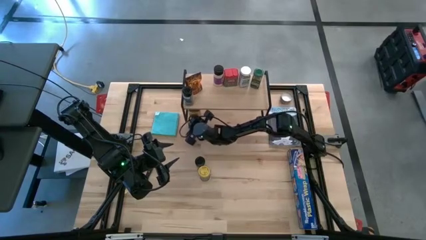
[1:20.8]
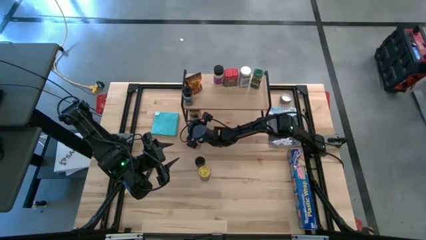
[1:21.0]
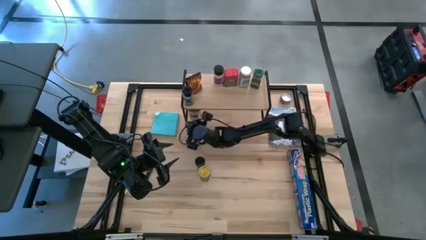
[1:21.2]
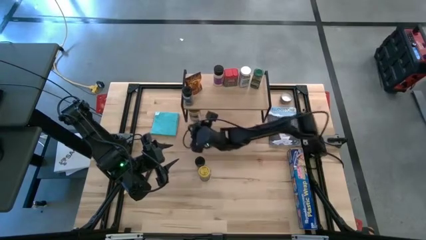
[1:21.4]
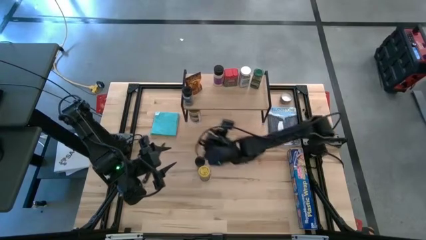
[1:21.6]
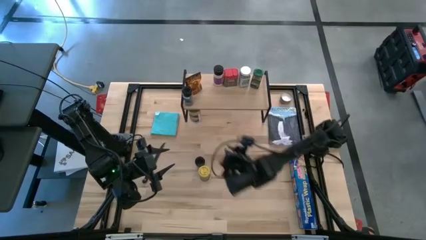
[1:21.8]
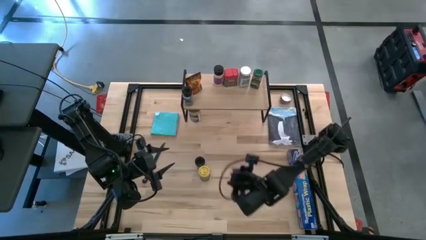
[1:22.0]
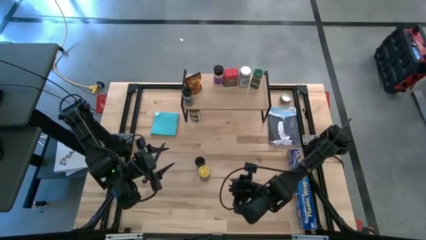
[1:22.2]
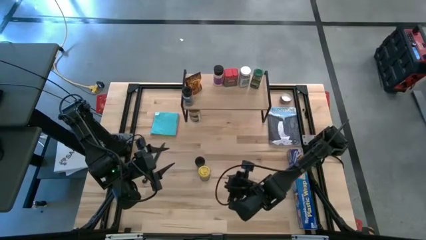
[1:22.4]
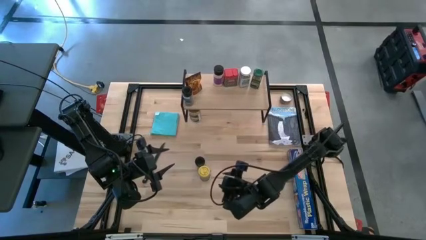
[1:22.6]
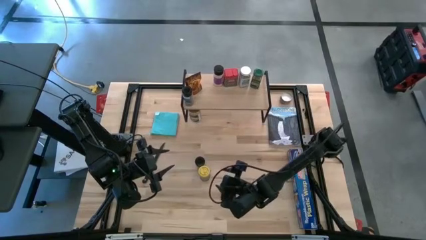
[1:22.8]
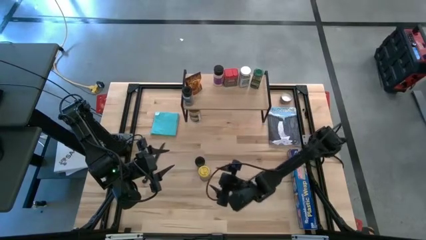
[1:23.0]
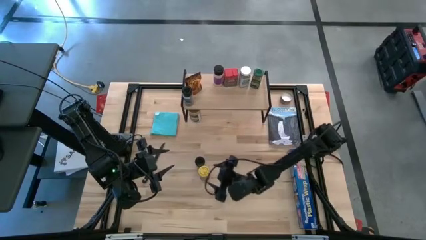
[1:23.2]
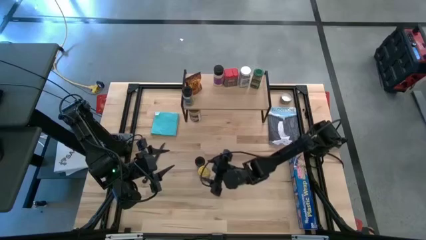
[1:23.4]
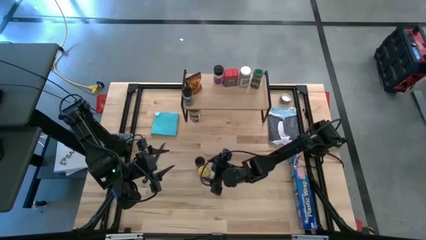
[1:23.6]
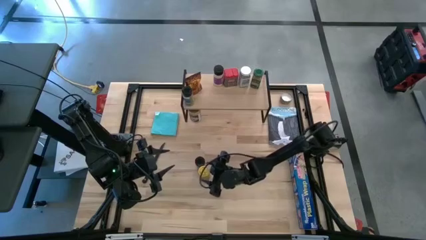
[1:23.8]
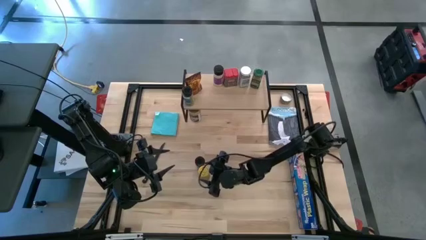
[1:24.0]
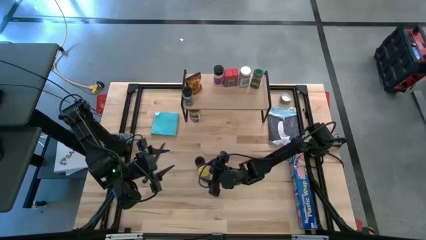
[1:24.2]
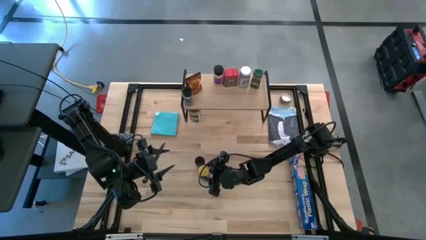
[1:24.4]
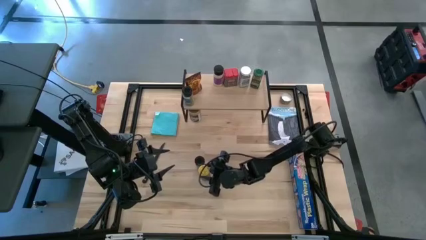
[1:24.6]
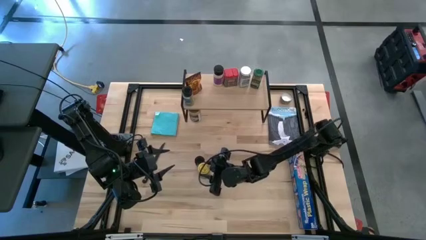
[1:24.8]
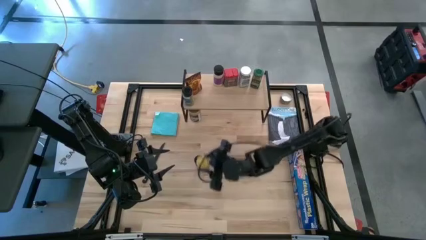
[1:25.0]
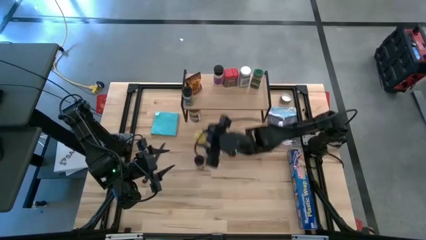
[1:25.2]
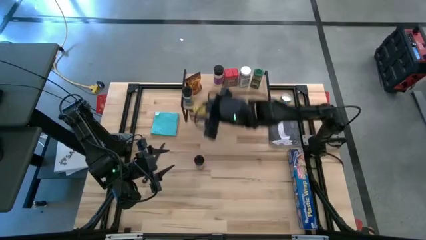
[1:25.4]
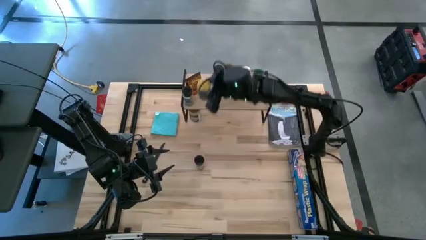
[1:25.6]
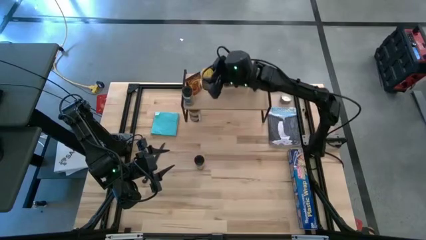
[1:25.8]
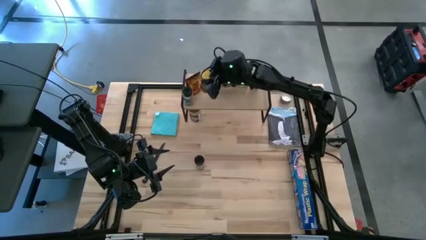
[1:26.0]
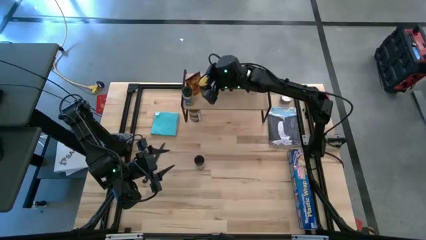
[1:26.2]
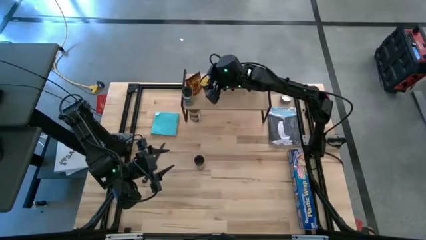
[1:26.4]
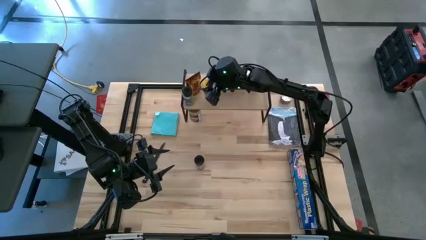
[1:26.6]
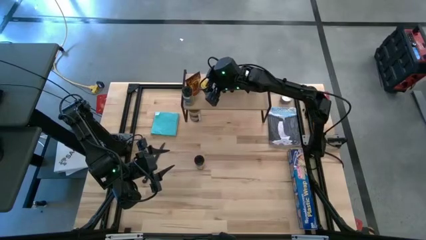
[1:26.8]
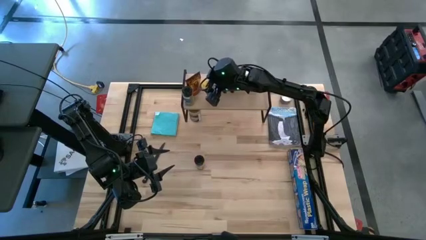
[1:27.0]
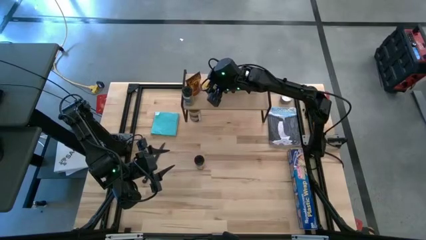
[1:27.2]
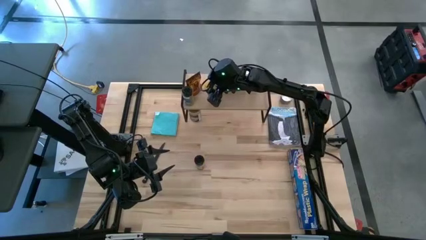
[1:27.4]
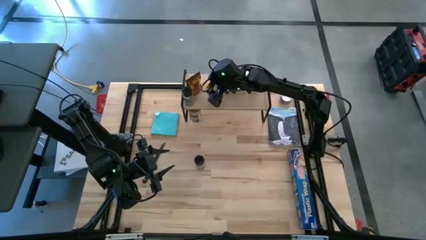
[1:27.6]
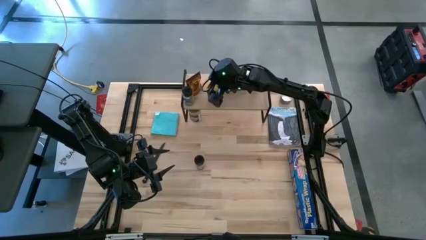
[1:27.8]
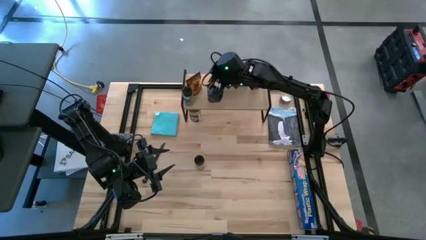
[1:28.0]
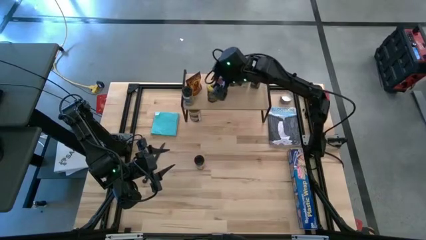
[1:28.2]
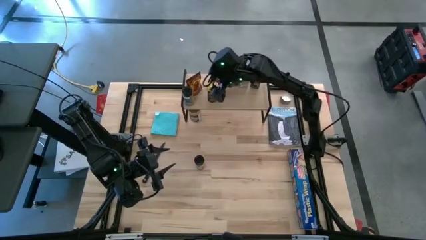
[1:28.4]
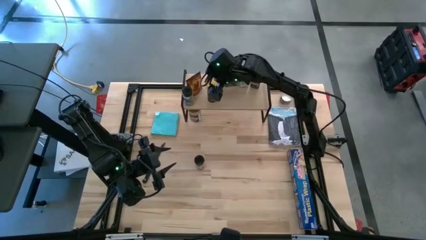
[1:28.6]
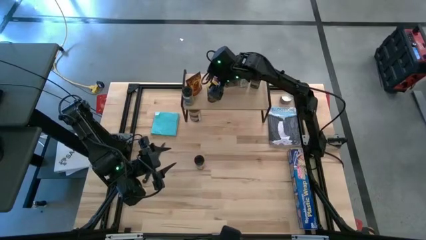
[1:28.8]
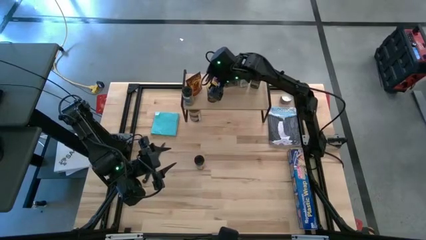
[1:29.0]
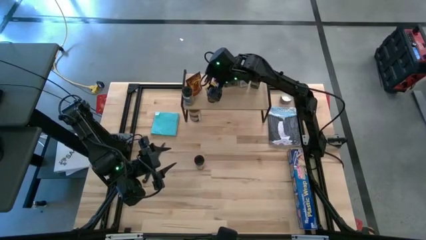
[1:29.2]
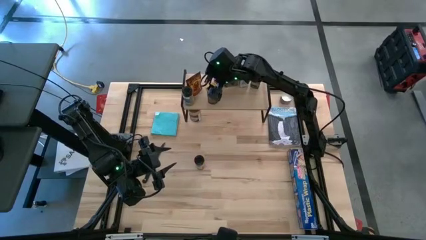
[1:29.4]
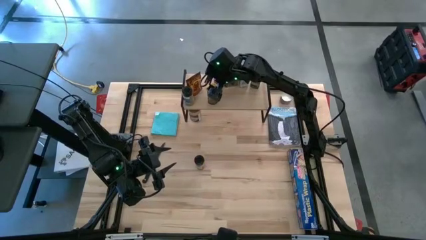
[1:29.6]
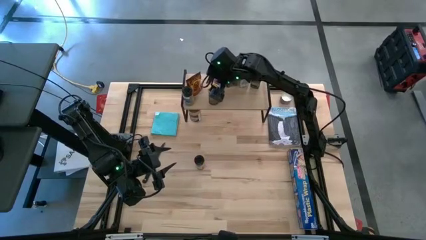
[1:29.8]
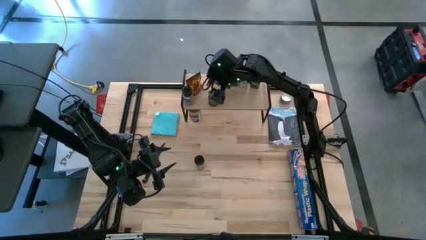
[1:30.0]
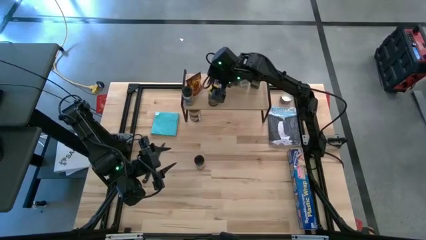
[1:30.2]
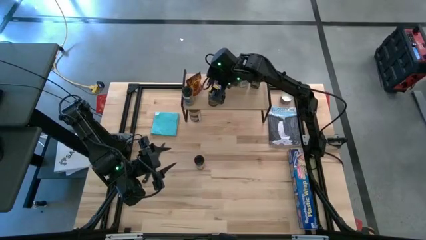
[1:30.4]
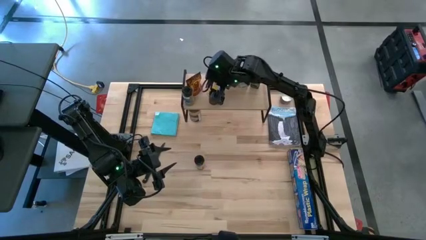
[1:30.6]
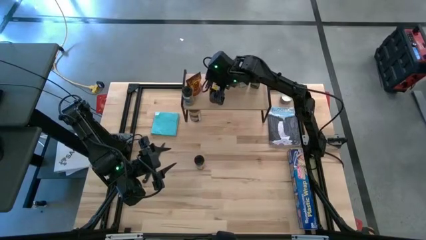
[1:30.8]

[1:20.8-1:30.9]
Task: Shelf spices
Put the yellow seasoning bottle on the shelf
